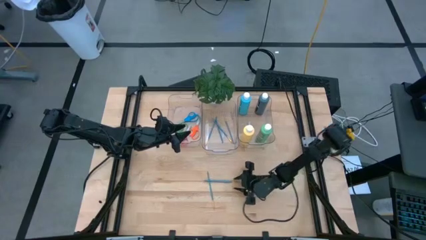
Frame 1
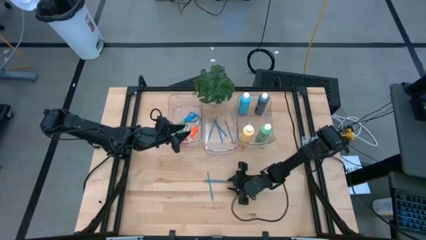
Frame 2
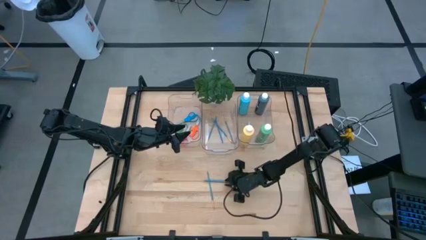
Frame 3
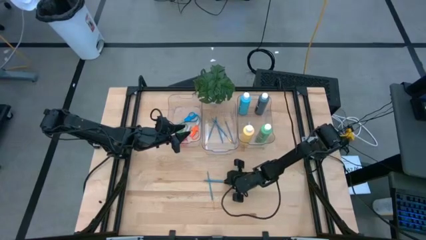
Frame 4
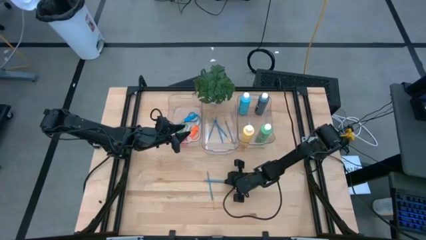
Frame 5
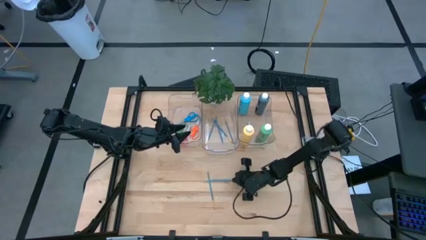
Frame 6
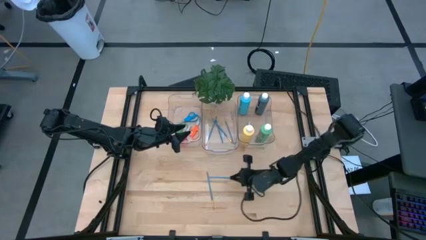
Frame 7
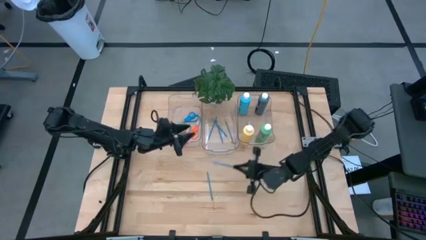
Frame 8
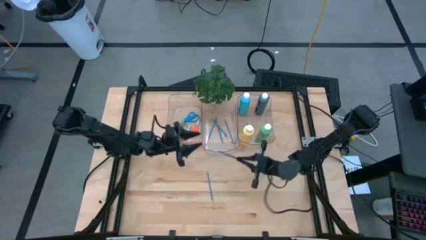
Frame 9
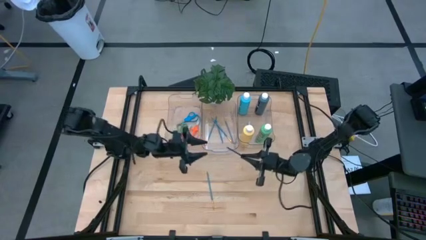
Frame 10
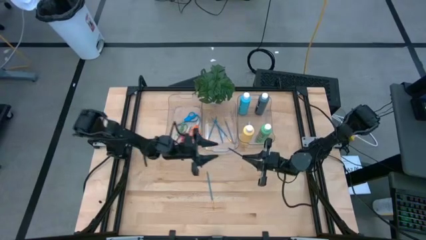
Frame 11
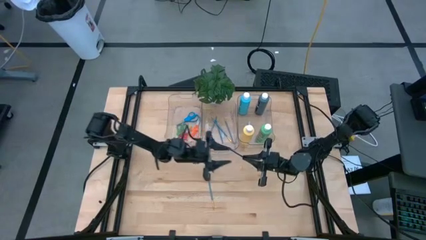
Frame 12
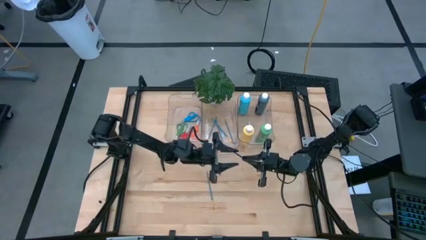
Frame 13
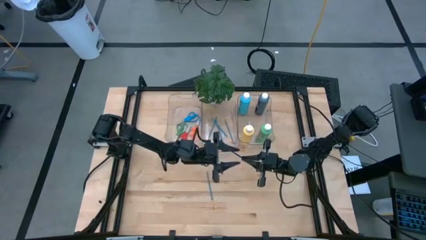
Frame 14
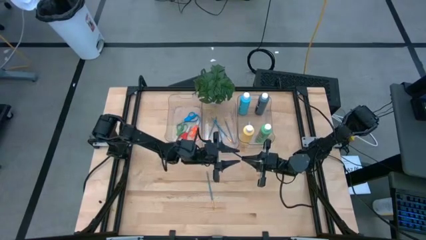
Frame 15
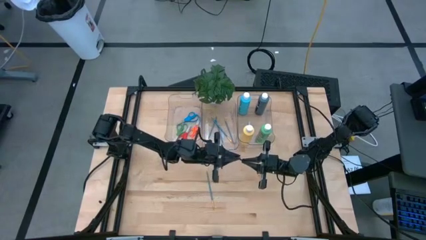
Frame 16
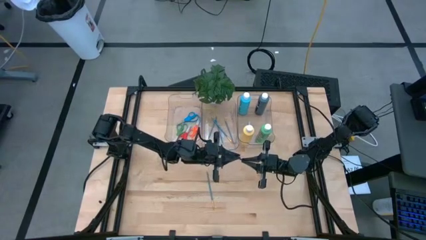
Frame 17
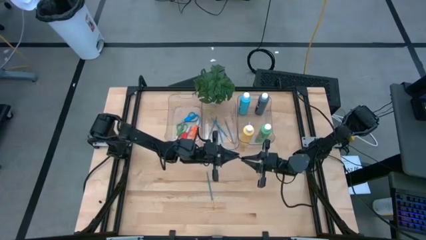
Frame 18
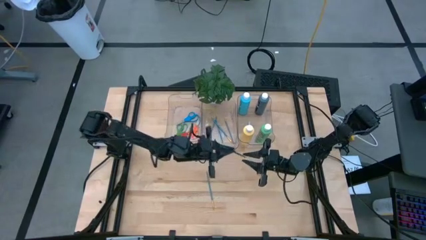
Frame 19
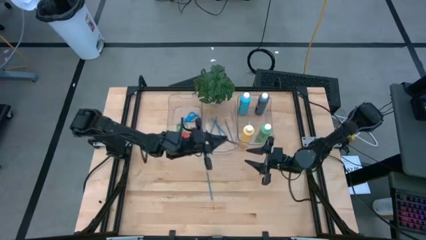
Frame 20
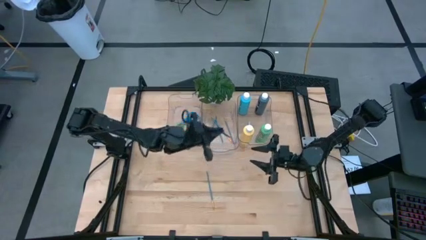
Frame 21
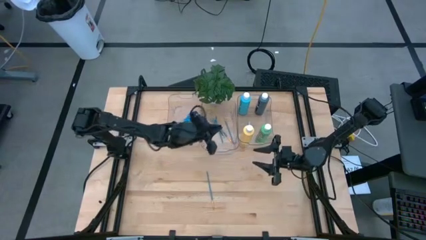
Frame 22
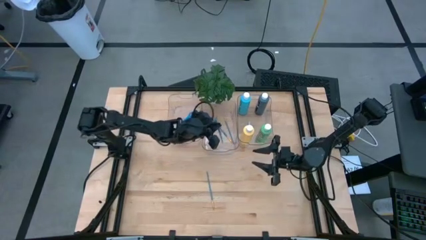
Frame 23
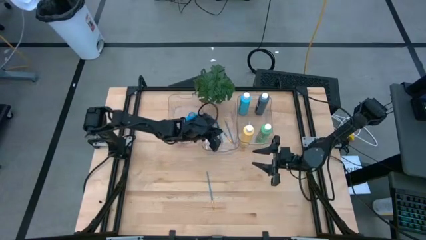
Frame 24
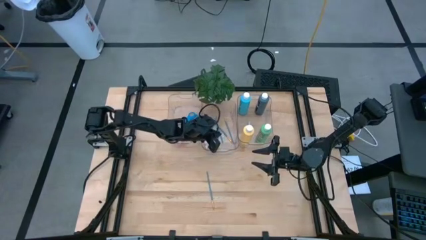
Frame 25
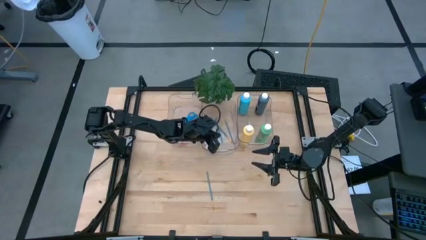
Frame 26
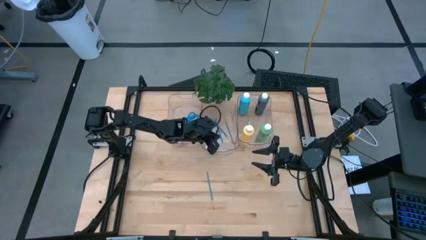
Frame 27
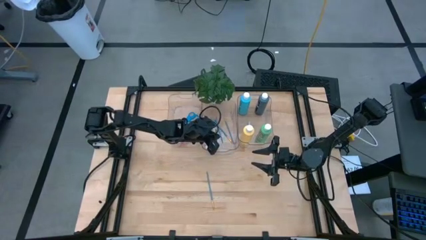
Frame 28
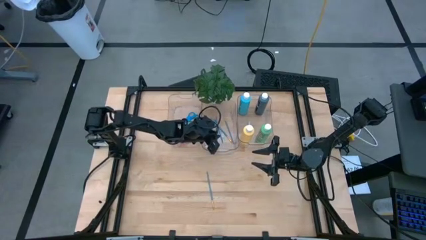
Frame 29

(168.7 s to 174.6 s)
Task: Pick & Place Paint Supplies
Put the blue paintbrush into the middle transparent bin

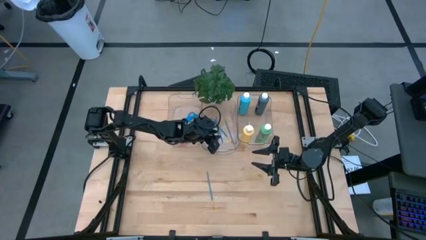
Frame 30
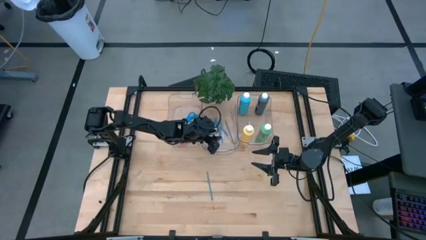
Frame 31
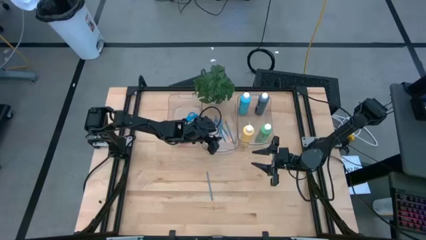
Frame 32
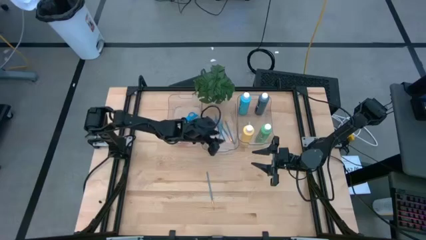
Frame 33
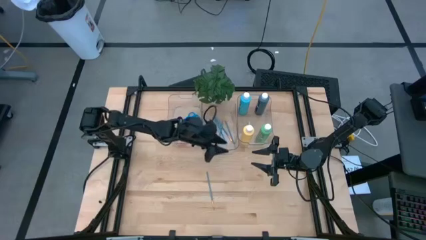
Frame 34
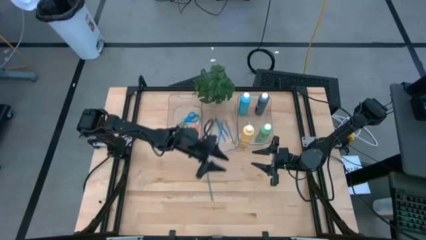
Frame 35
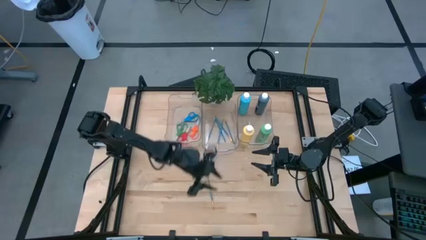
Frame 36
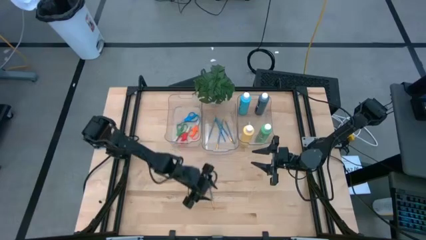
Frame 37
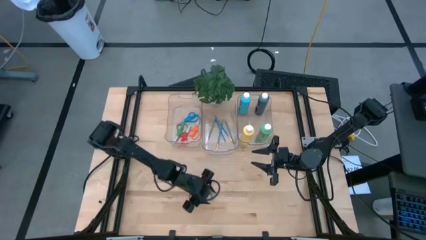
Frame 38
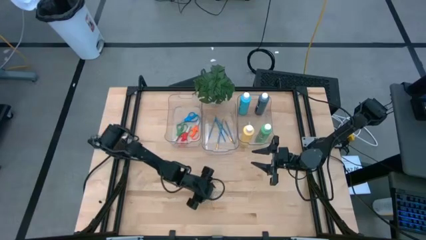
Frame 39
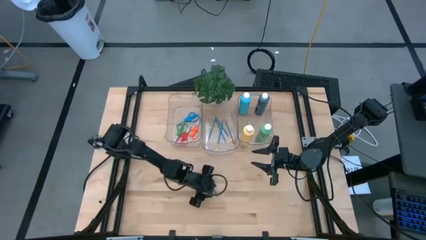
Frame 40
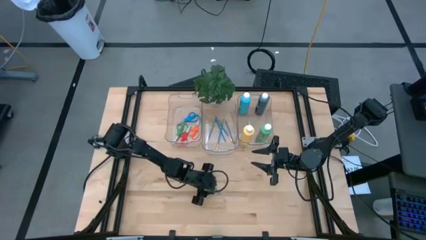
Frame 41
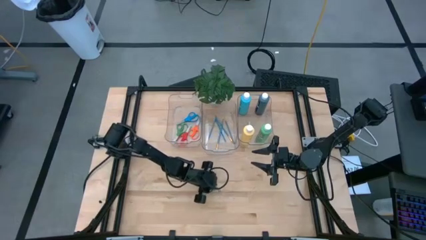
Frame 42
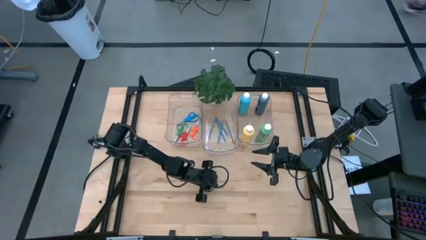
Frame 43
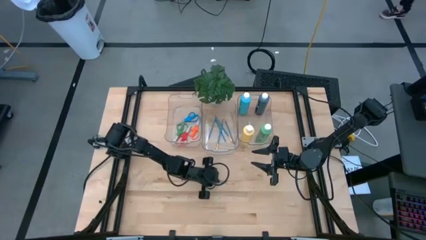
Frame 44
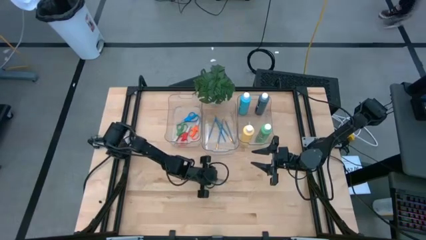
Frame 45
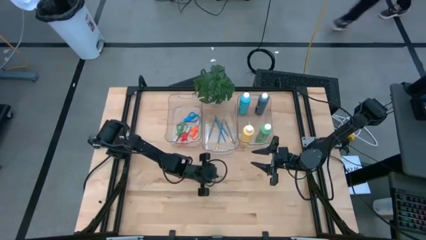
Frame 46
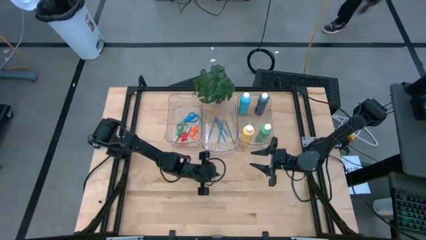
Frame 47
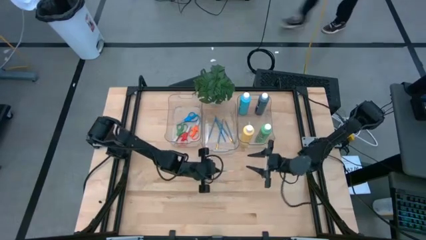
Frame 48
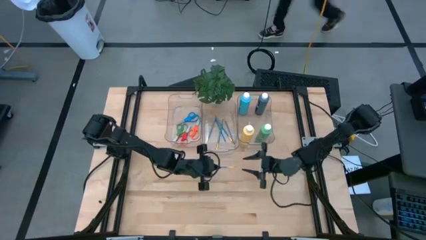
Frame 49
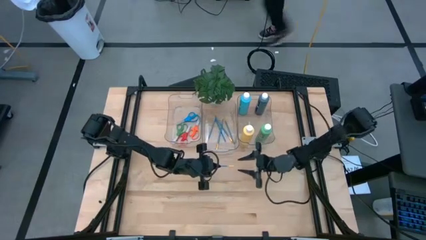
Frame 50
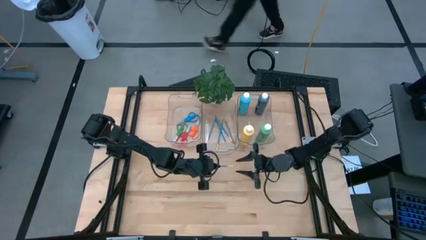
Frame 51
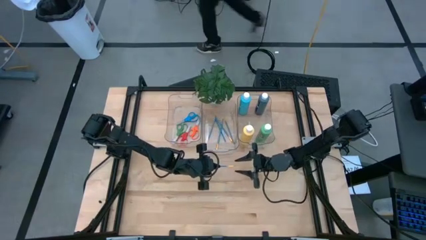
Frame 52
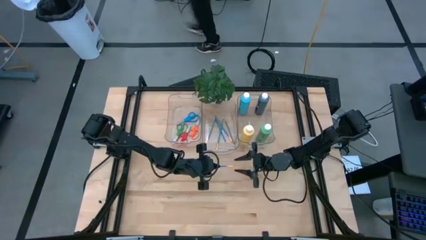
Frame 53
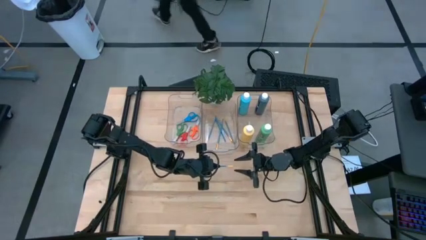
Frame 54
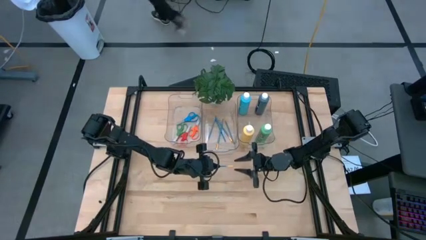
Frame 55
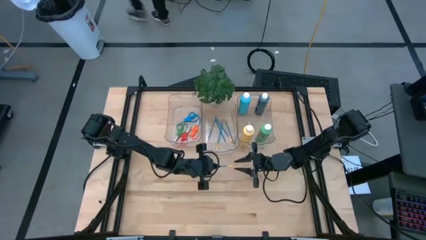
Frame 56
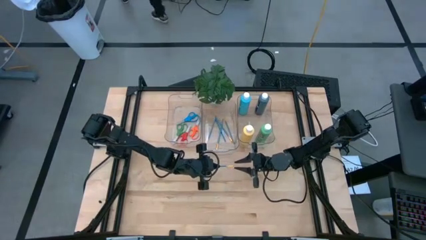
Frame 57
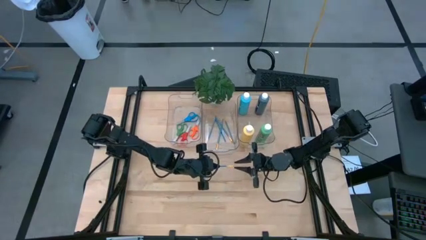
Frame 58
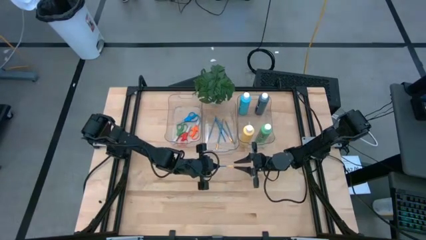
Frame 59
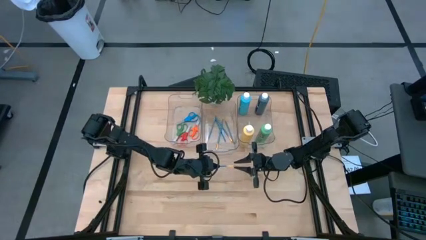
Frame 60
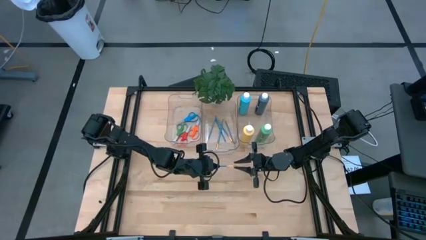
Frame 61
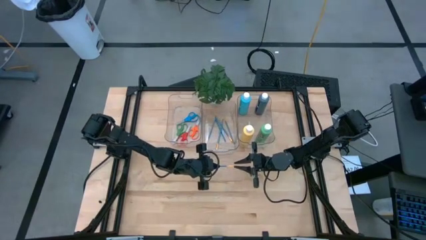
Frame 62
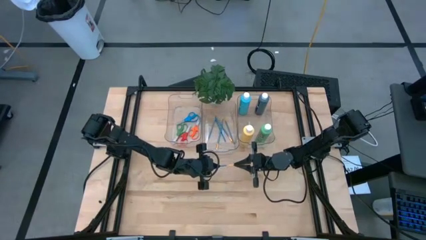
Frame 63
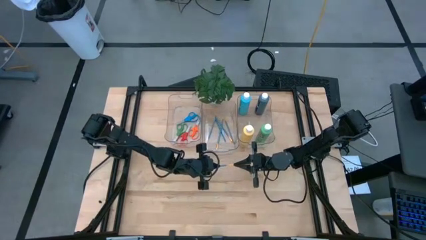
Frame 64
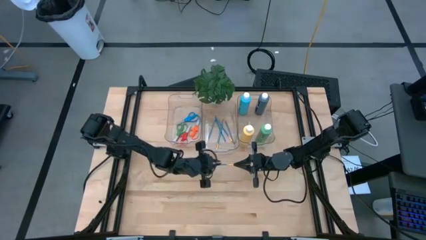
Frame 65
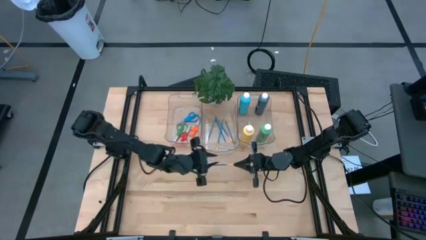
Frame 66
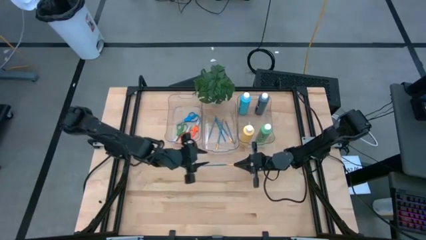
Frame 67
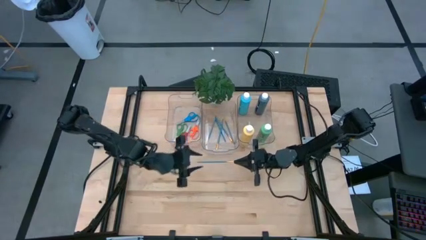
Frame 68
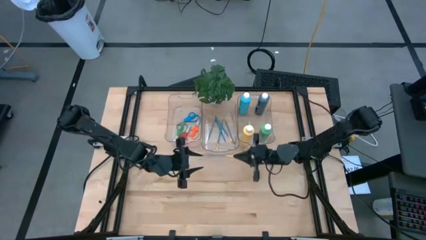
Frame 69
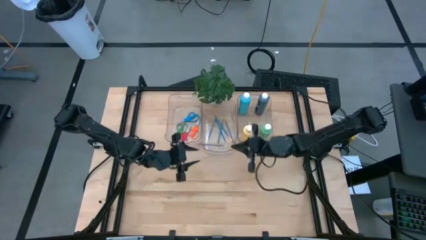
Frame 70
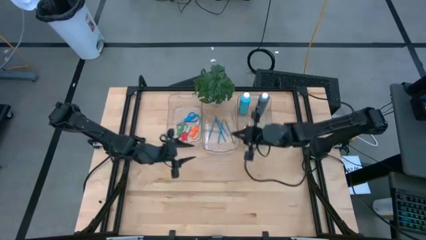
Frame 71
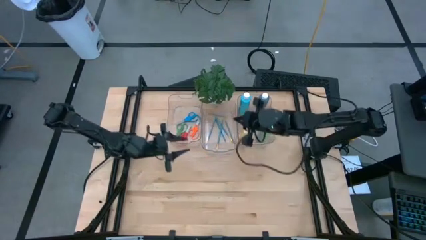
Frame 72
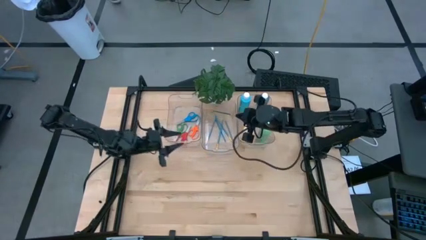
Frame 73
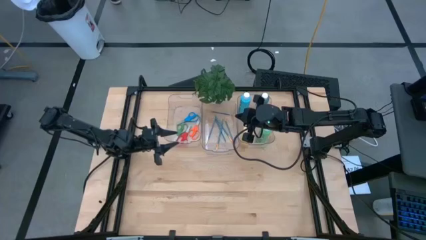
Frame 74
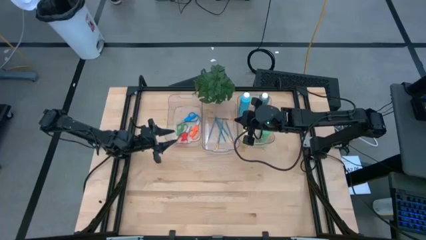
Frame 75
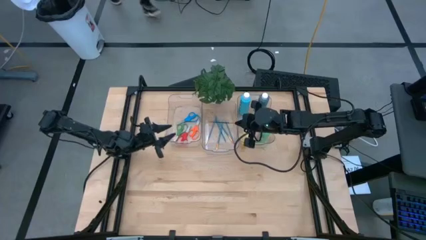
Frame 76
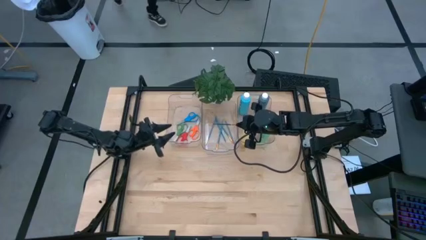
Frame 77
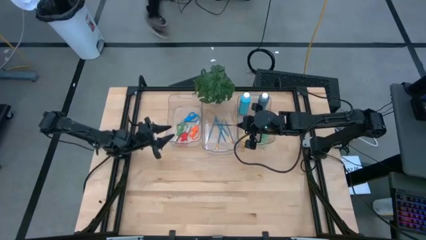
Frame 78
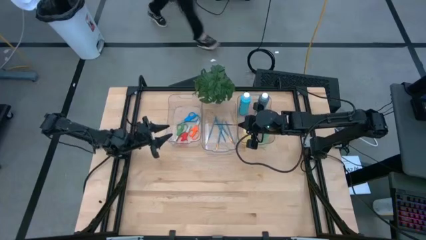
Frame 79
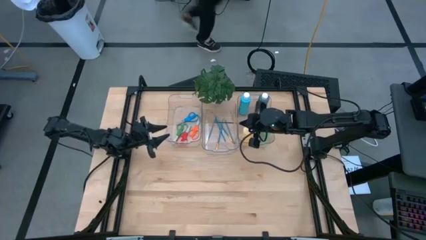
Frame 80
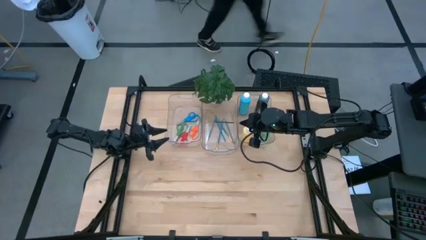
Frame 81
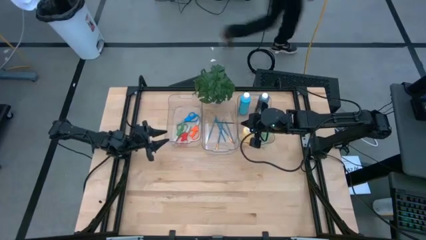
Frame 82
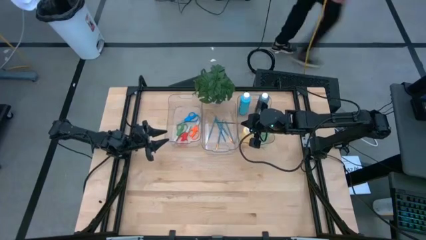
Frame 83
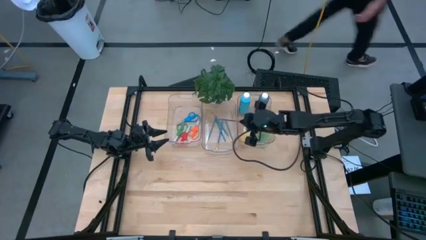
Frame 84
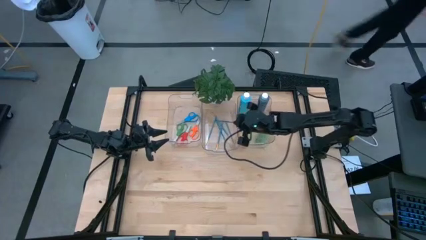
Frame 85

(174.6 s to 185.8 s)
Put the blue paintbrush into the middle transparent bin
